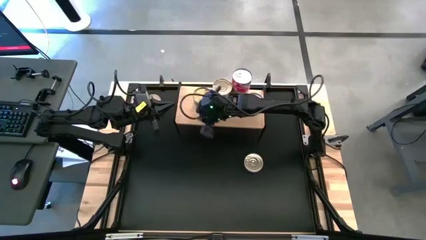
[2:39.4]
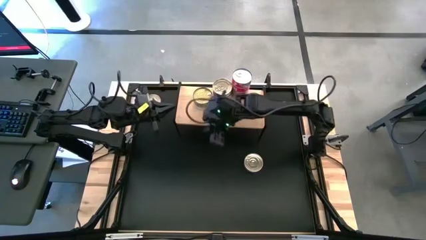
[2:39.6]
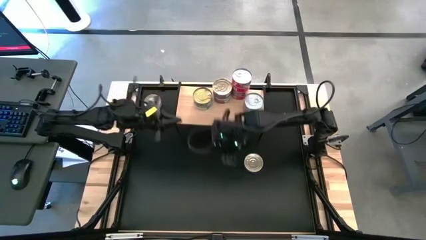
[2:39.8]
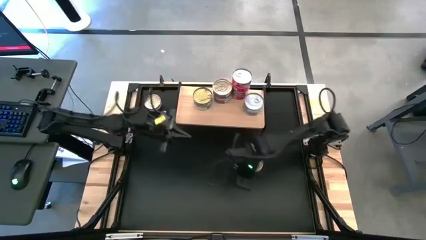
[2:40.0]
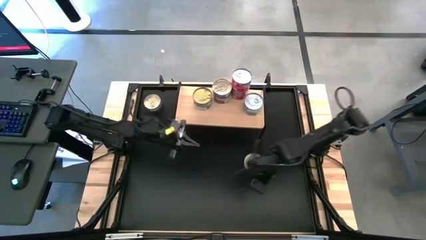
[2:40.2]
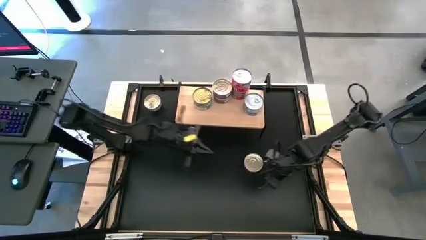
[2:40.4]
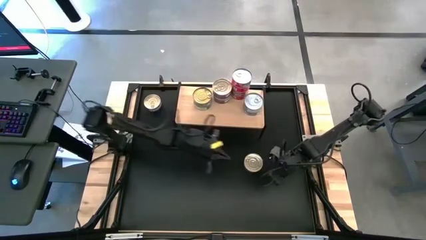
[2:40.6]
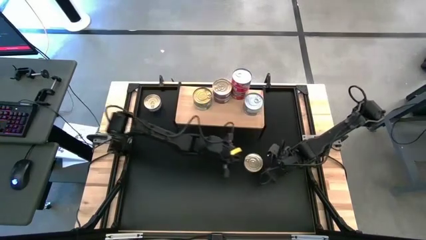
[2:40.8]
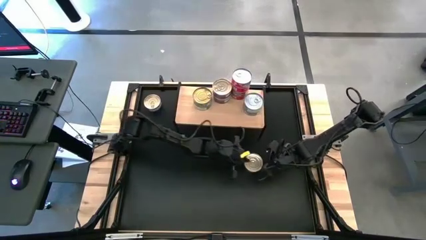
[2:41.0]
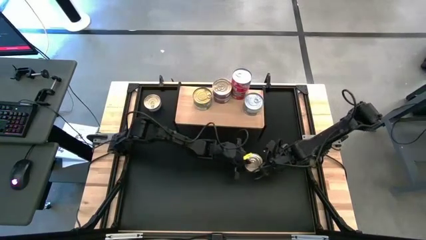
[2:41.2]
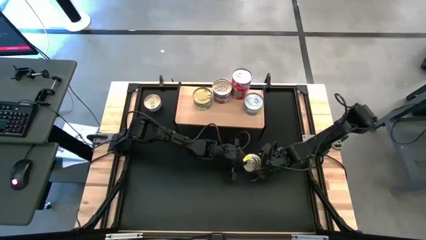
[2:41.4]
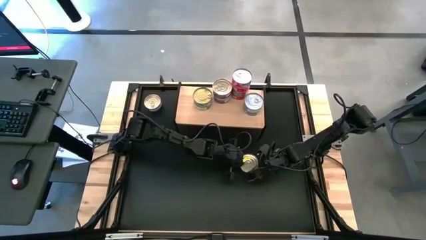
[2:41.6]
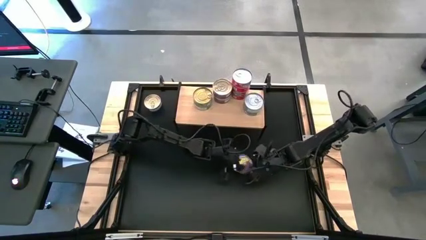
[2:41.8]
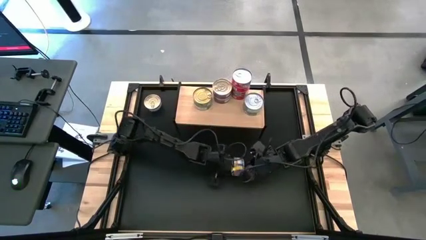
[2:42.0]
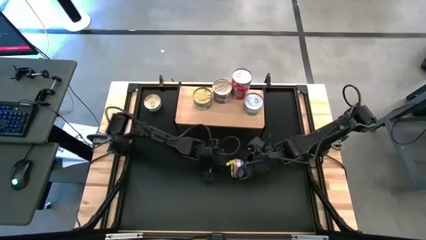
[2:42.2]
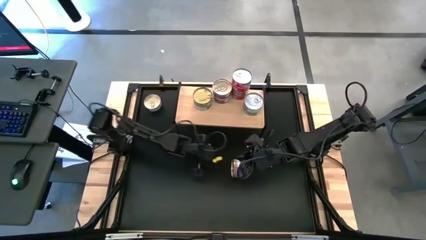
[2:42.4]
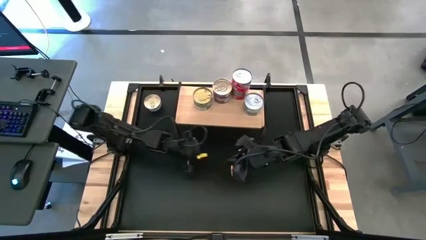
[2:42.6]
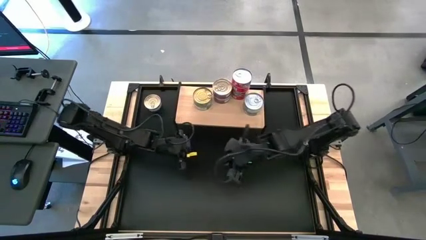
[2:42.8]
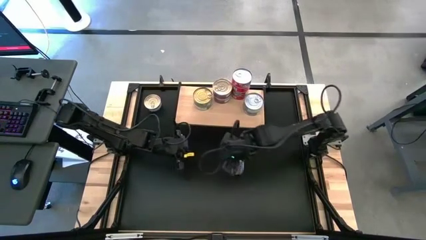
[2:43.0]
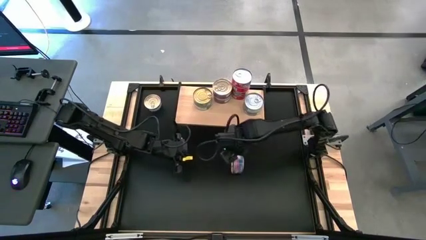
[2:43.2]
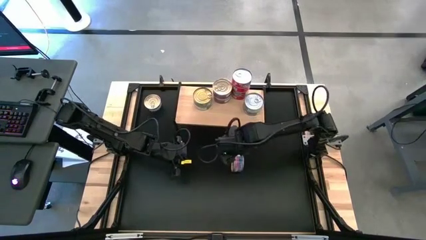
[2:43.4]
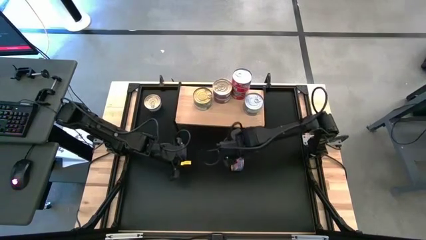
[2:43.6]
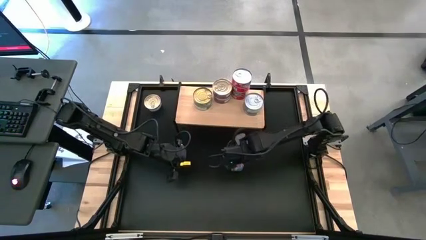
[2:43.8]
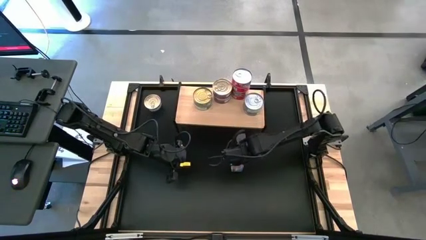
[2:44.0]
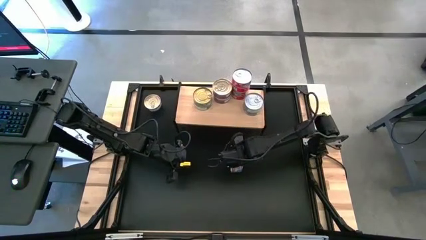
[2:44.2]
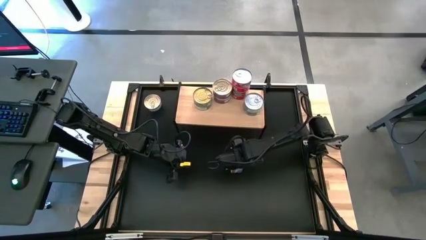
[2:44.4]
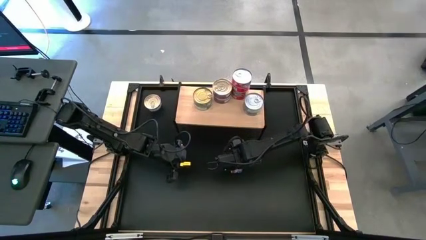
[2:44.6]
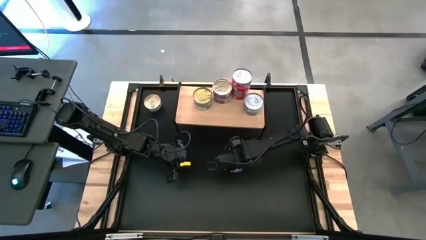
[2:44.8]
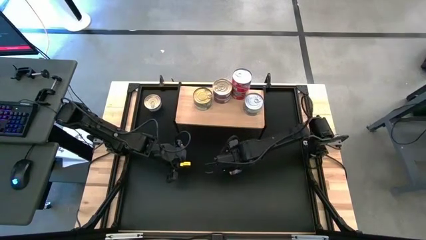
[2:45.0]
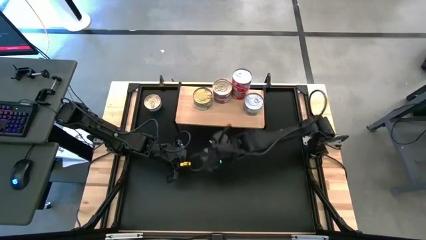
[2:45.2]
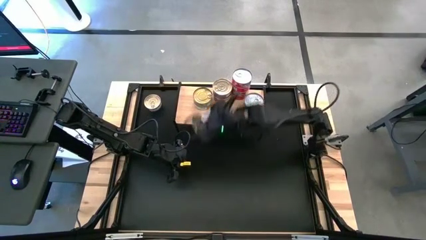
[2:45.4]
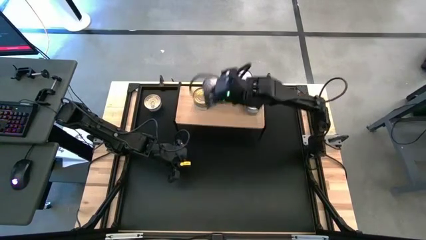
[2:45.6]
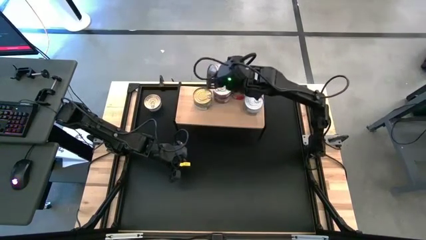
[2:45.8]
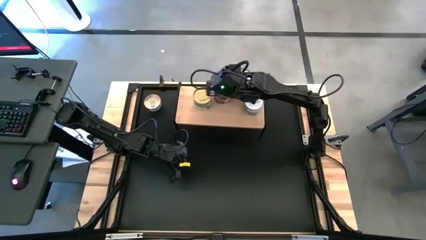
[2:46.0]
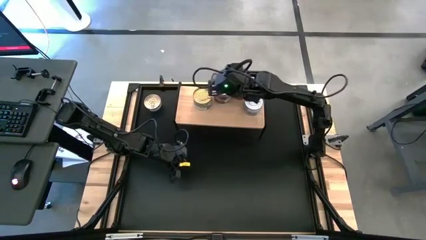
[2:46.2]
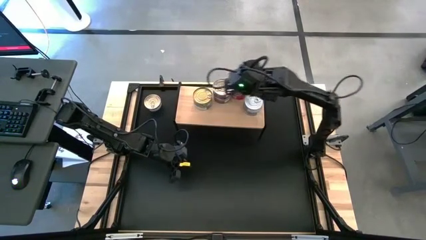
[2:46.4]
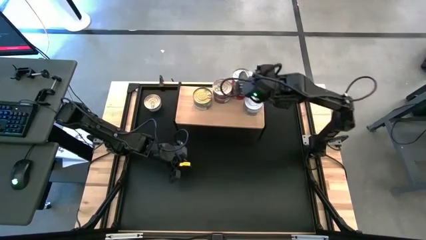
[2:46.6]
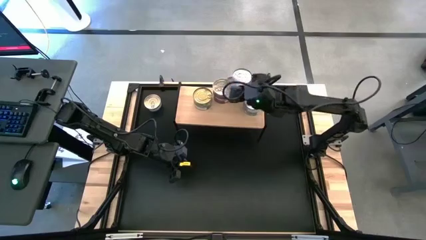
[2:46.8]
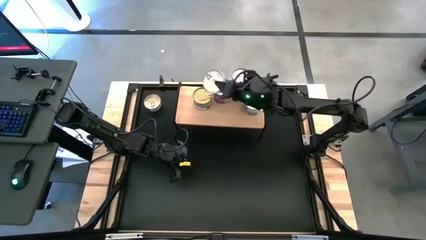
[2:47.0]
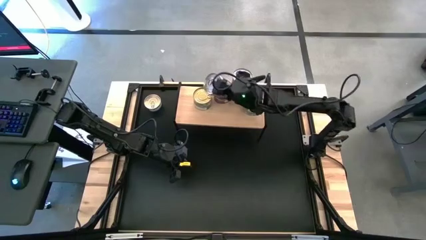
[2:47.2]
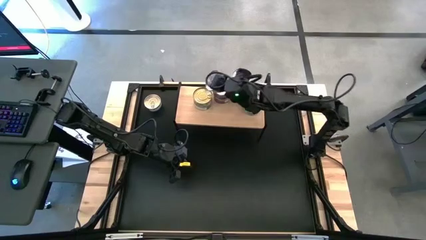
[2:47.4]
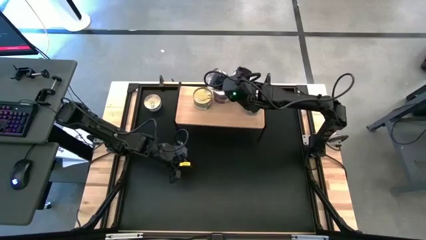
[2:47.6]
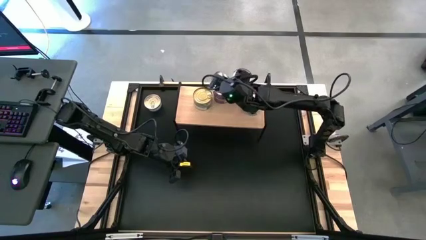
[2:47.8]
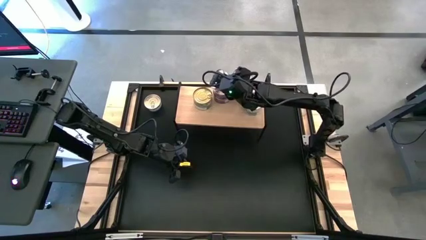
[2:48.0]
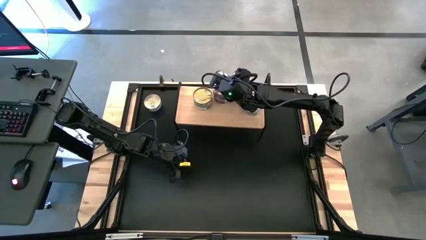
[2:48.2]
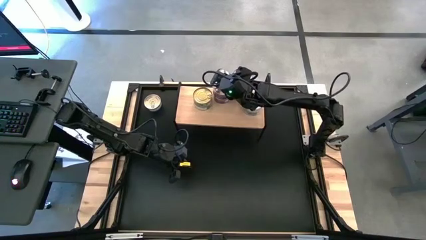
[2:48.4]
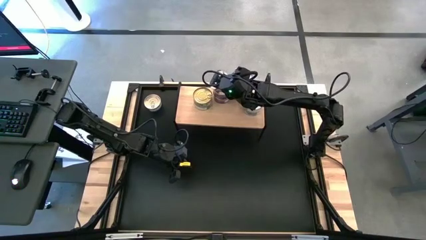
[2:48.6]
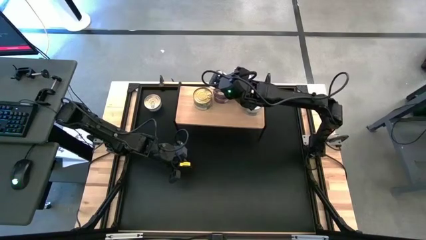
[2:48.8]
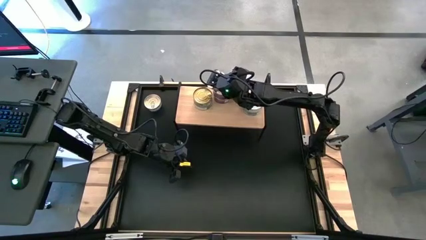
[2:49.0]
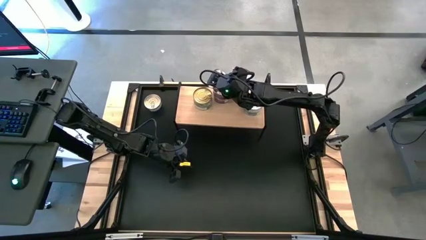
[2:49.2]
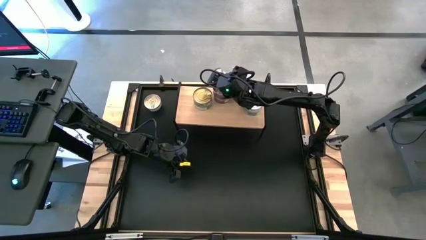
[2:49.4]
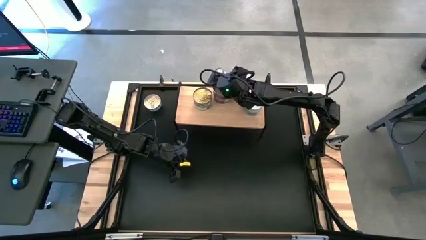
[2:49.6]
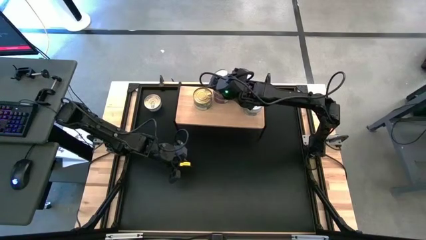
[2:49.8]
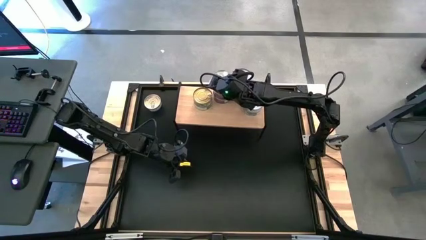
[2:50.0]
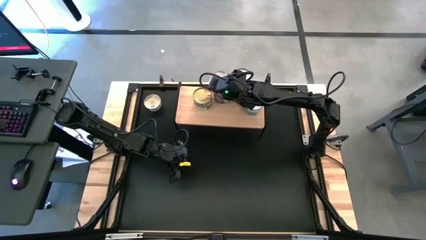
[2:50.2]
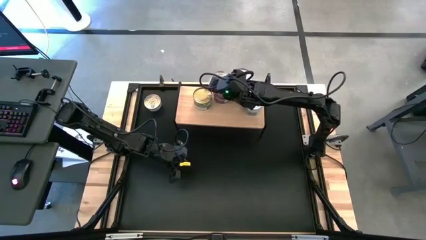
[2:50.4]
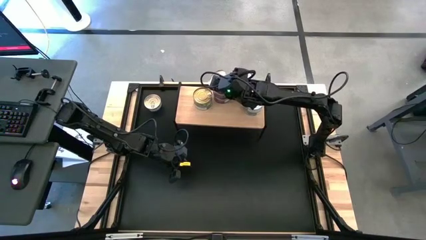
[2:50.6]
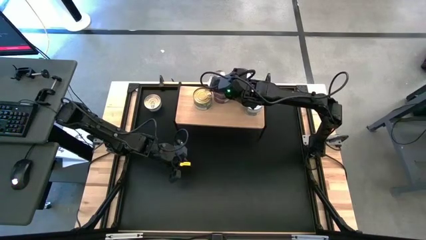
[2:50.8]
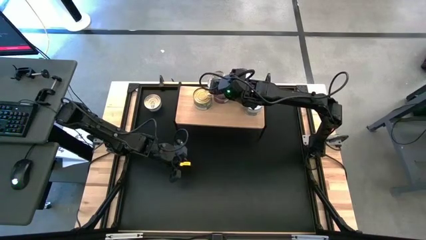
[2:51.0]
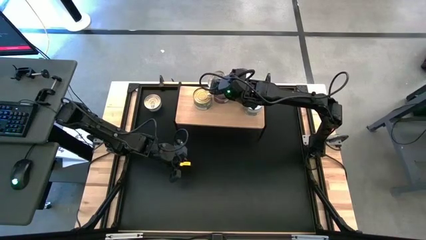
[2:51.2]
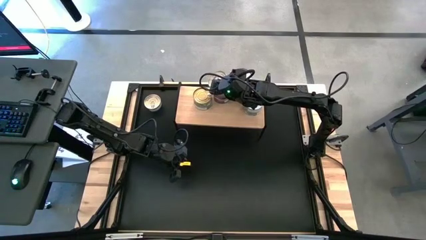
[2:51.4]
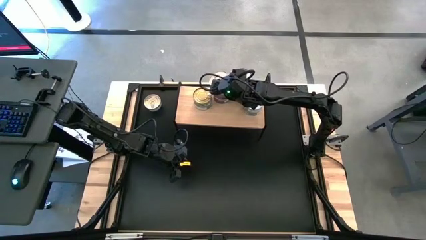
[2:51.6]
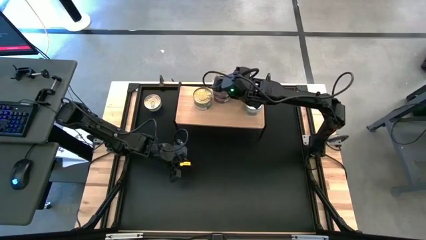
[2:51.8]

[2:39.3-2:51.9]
Task: Stack canned seafood by type on shelf
Stack the blue tuna can on top of the blue tuna can on the shelf
